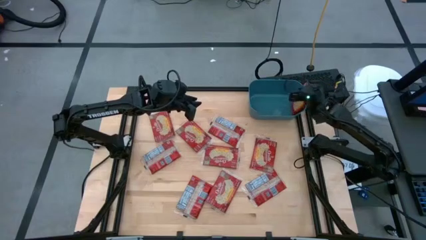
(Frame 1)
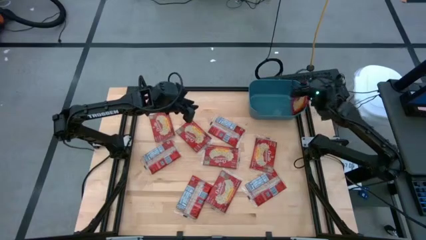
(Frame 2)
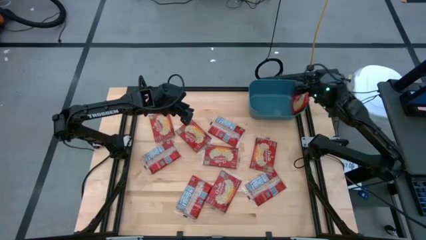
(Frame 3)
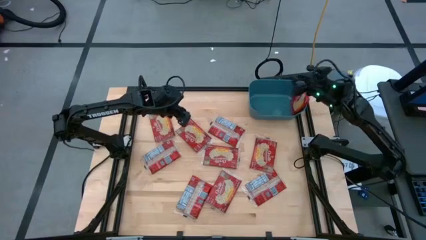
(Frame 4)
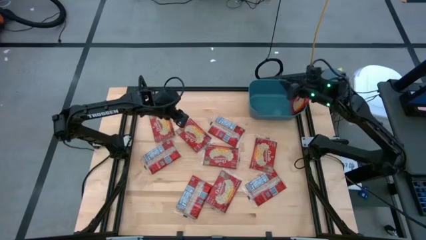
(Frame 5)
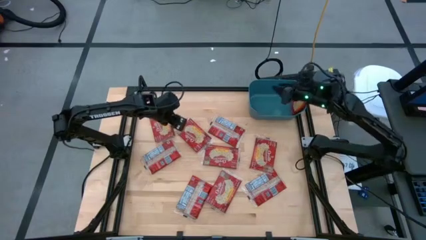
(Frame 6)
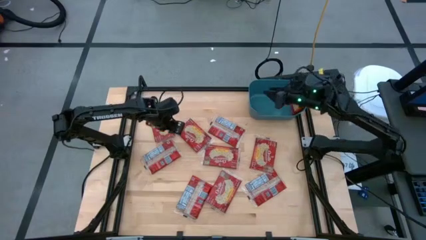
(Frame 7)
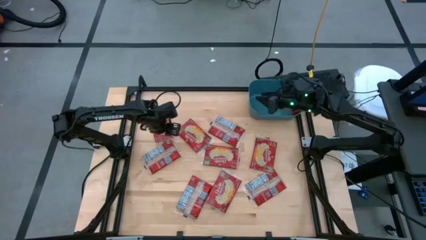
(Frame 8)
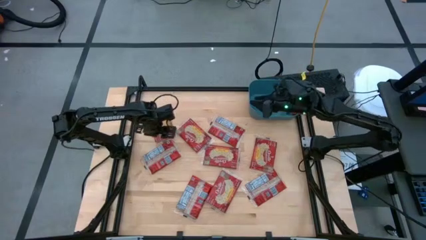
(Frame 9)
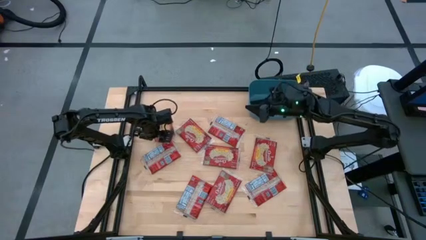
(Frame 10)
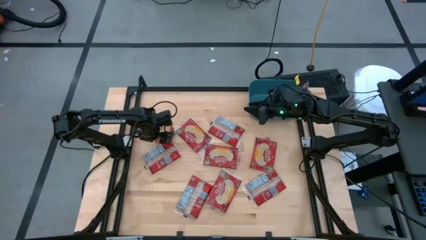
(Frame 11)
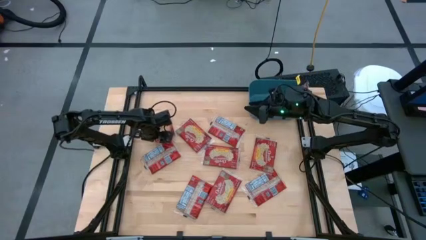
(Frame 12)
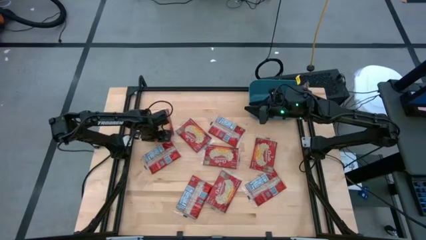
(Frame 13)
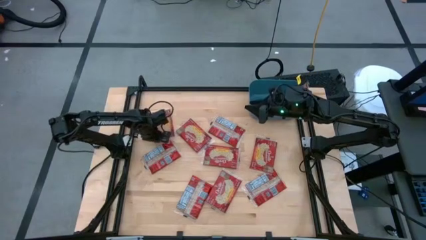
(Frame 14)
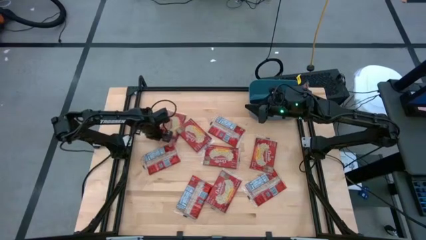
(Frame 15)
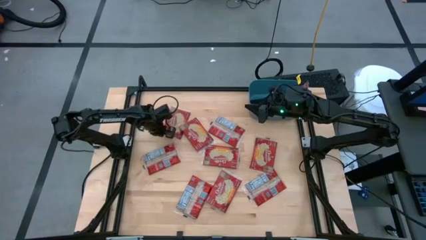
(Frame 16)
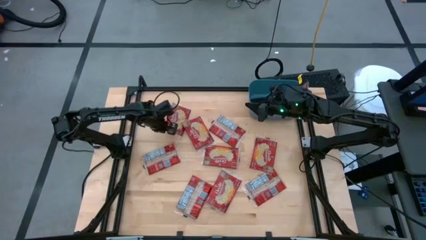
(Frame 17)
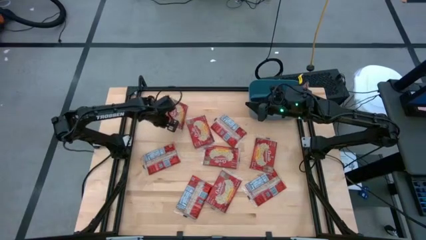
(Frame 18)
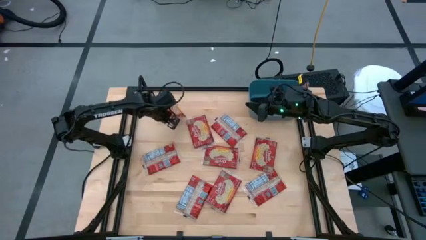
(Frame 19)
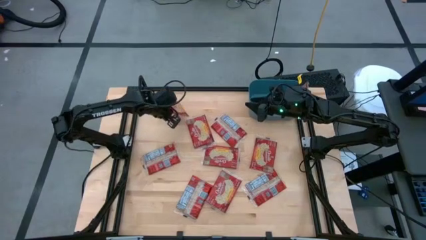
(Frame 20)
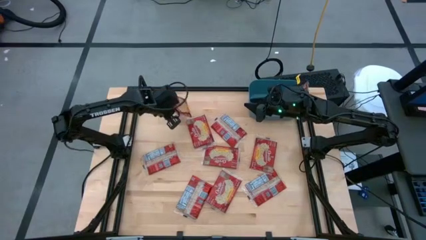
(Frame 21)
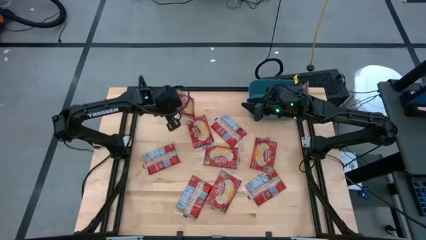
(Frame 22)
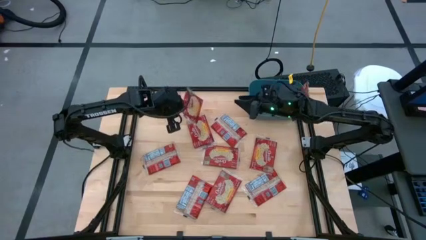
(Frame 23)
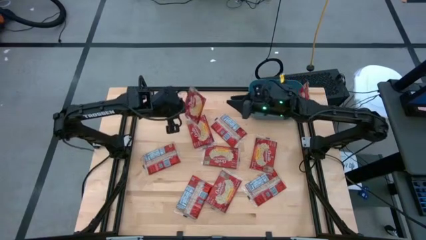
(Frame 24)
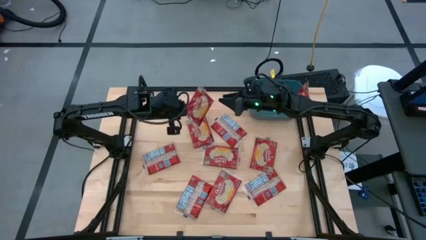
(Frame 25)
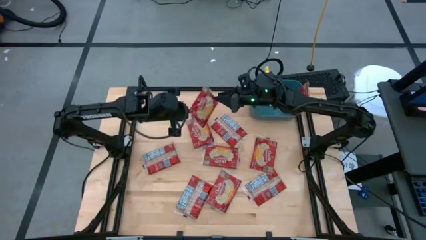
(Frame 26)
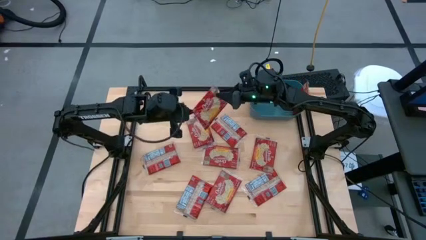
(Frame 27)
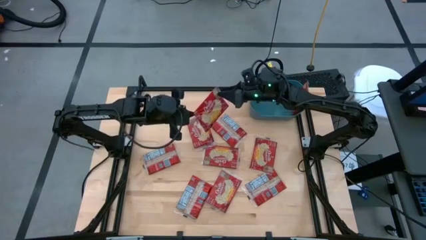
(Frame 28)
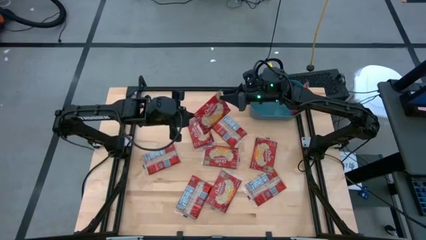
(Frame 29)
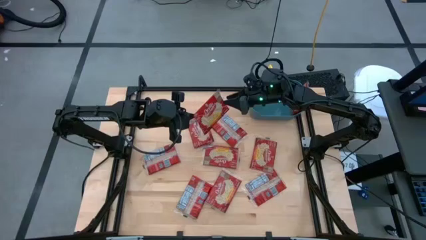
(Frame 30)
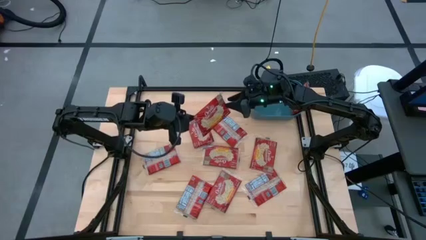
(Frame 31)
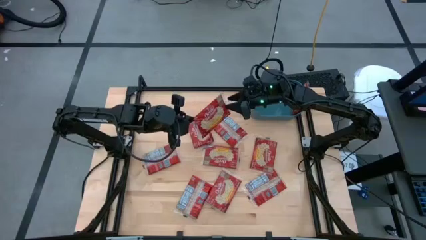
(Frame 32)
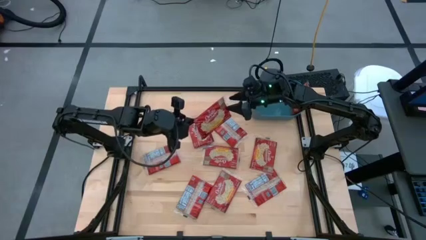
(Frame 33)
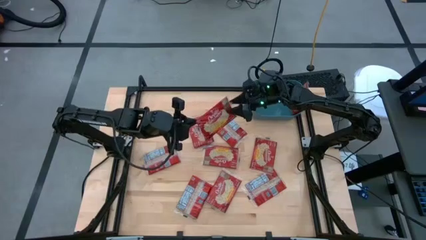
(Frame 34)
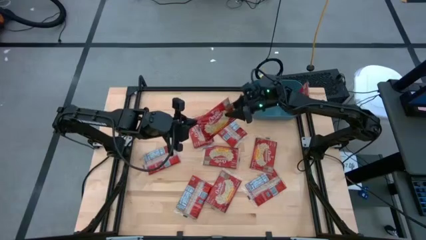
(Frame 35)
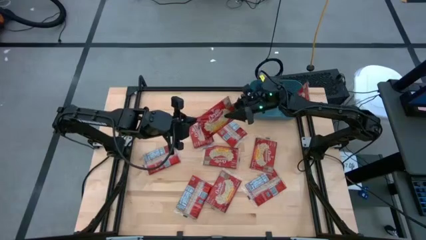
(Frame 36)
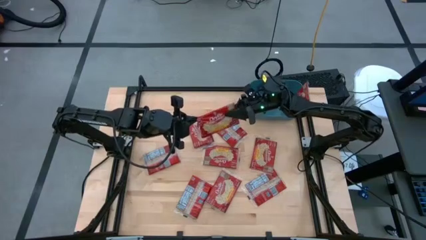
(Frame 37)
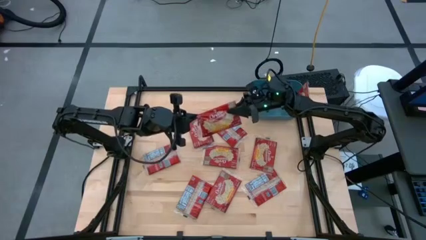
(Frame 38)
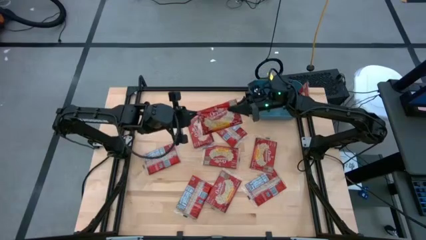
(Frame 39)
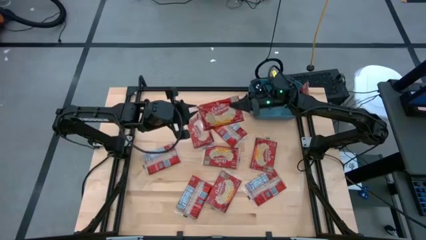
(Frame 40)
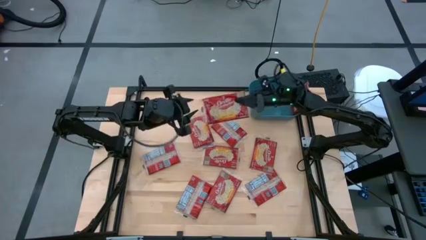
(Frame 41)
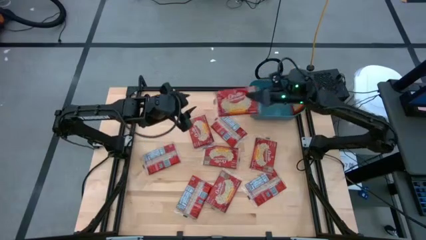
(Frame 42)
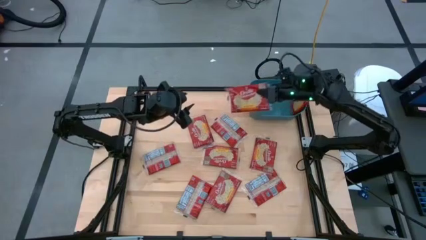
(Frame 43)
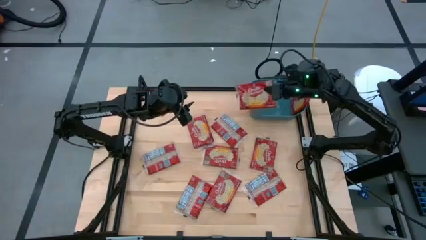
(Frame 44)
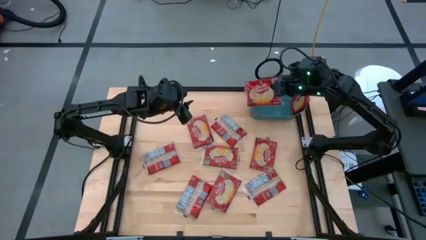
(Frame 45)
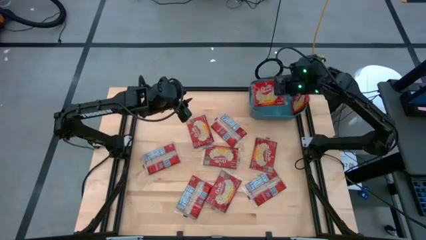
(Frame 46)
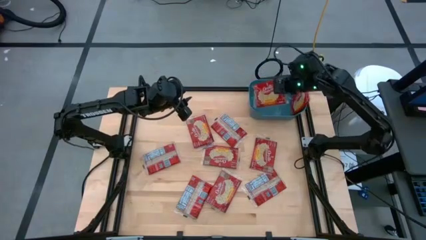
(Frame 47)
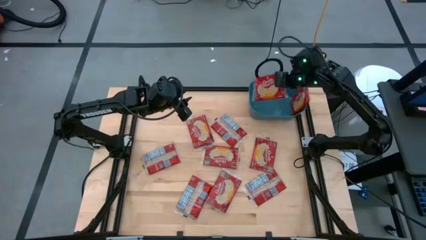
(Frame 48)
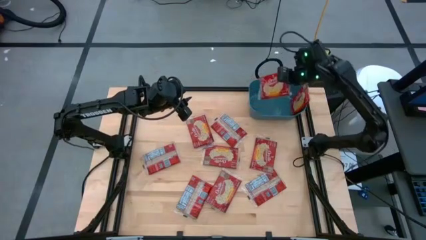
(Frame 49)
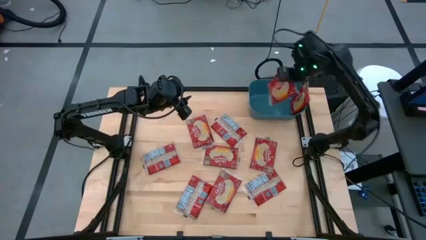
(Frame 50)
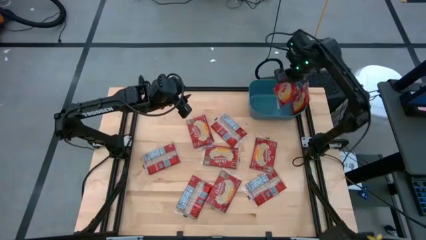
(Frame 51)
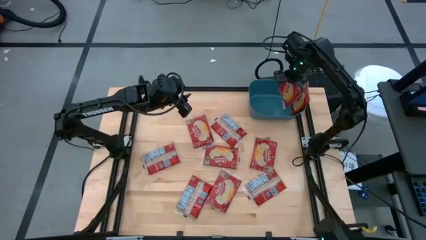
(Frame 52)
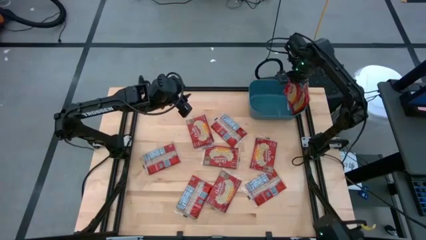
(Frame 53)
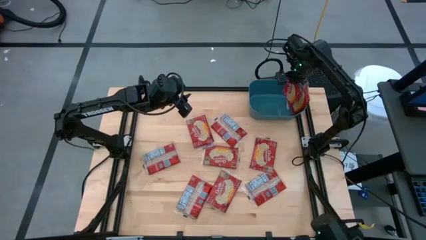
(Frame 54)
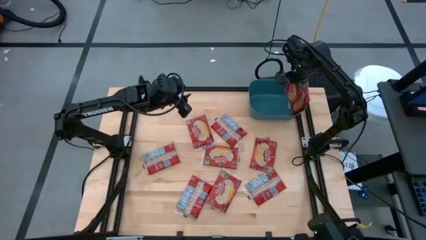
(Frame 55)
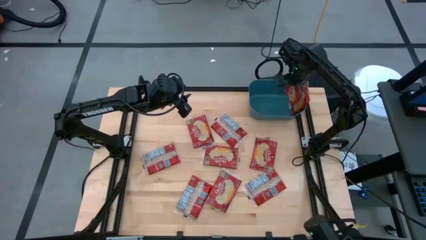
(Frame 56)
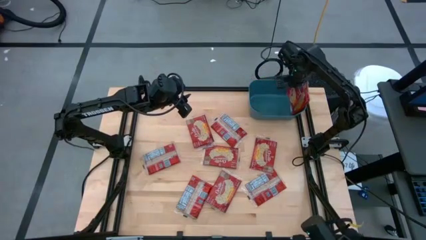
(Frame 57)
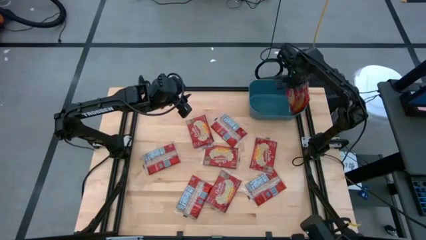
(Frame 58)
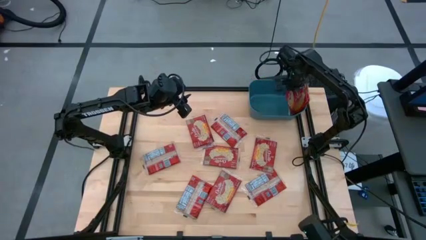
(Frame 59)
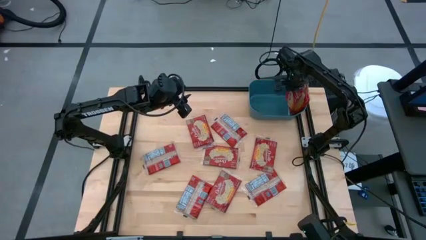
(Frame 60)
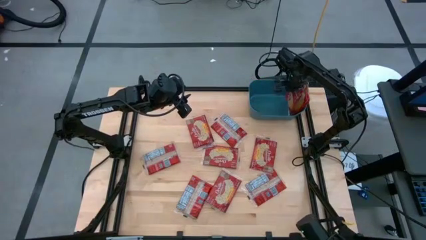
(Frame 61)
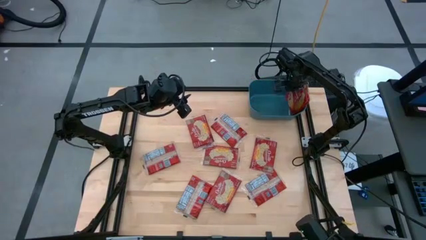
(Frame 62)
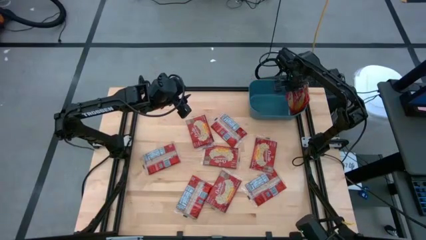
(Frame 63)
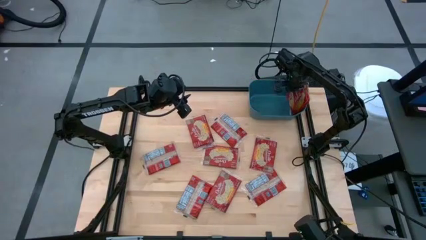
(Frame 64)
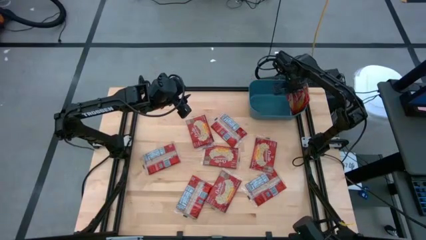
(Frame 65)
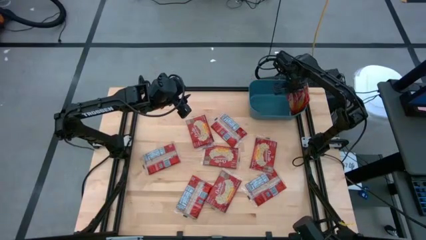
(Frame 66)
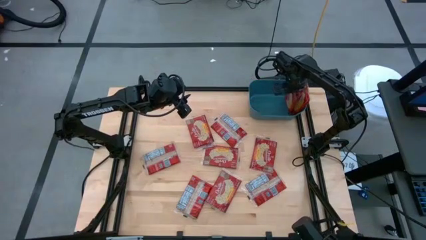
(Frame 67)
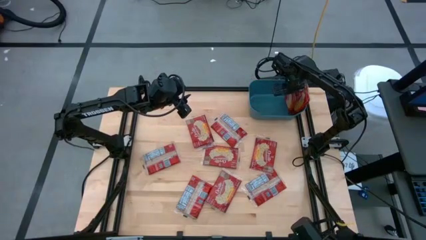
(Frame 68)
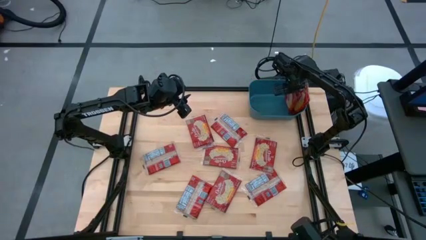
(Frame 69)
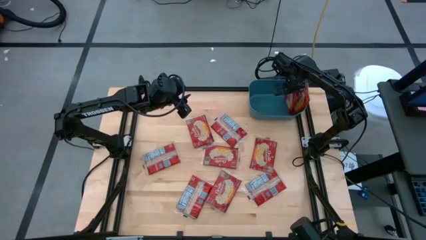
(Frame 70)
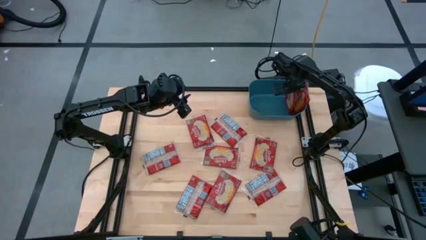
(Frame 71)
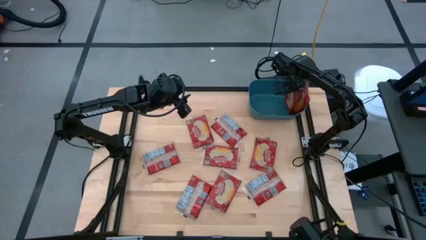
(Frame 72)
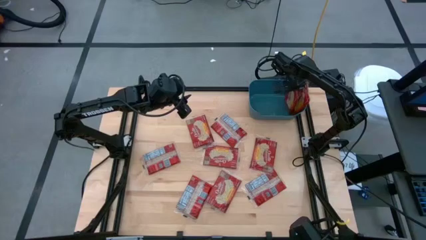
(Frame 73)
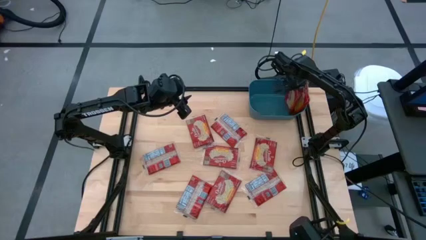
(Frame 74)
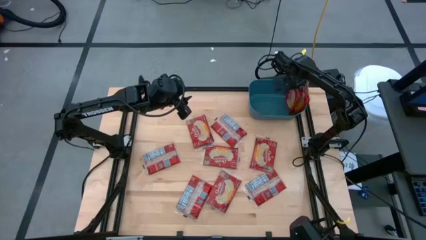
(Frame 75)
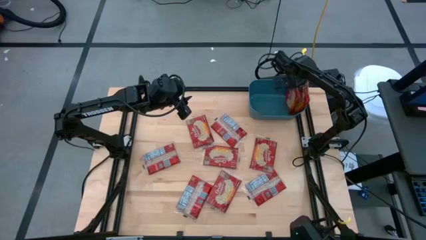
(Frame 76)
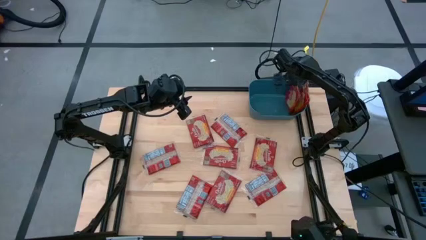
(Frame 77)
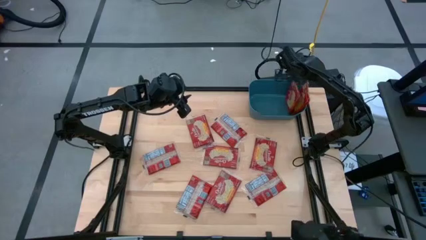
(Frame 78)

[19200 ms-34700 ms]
Task: Sort popcorn bags into baskets
Put the popcorn bag into the blue bin
